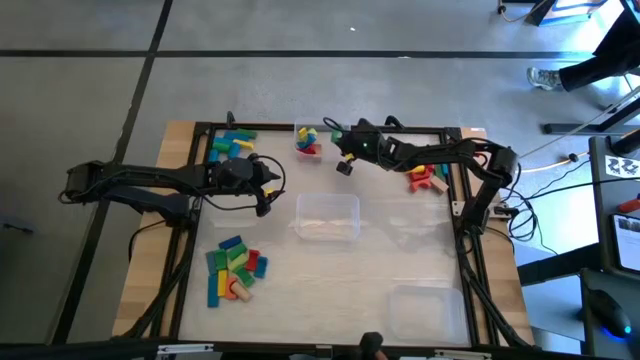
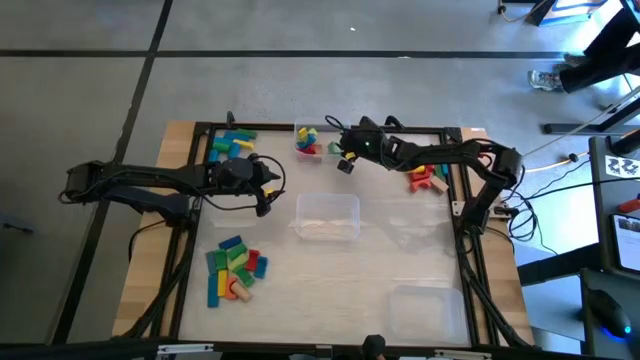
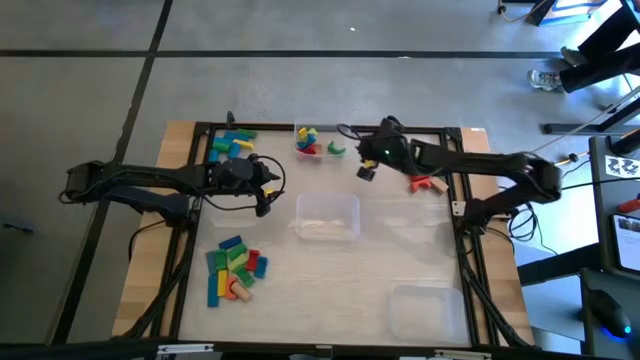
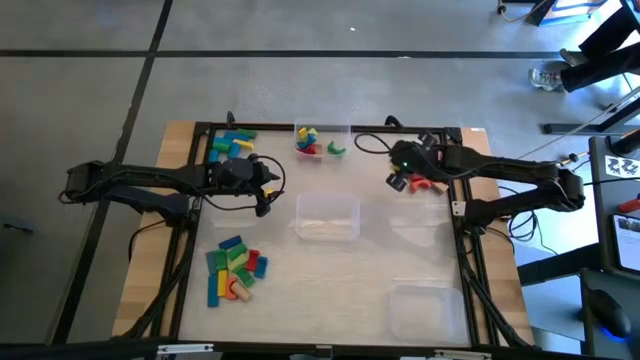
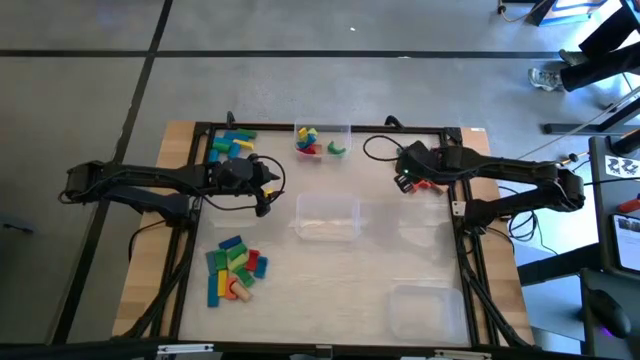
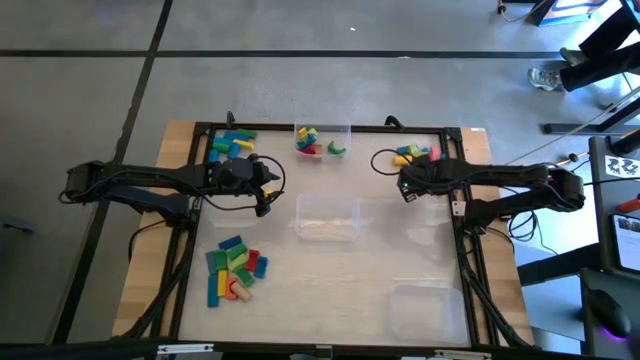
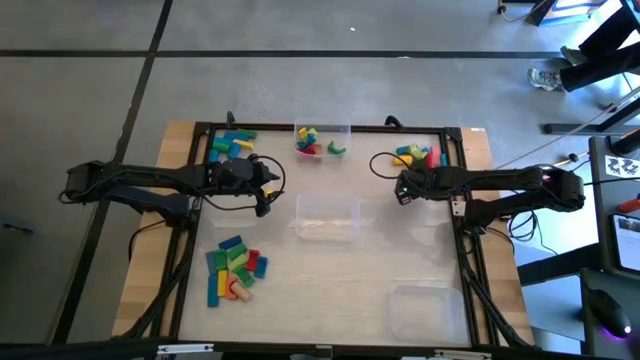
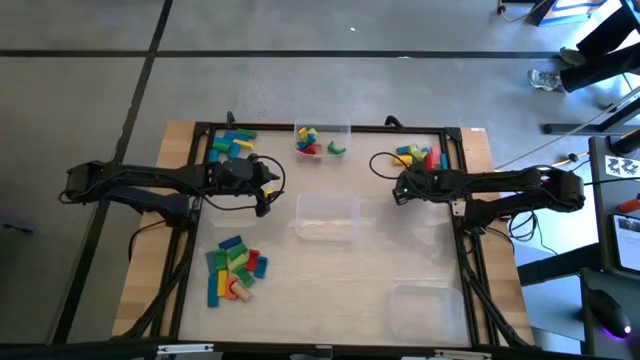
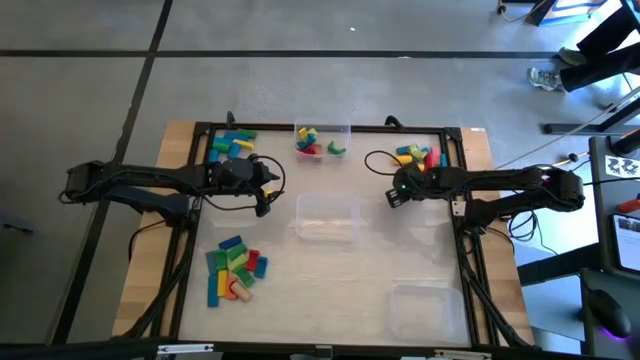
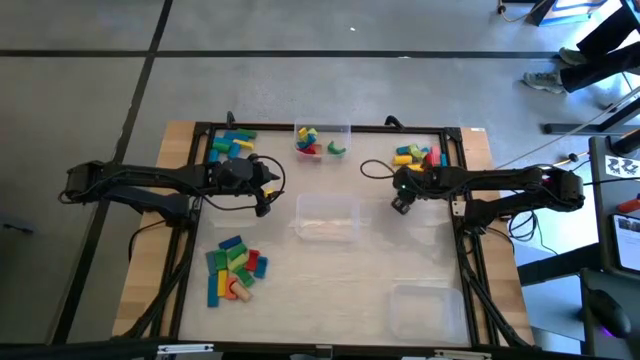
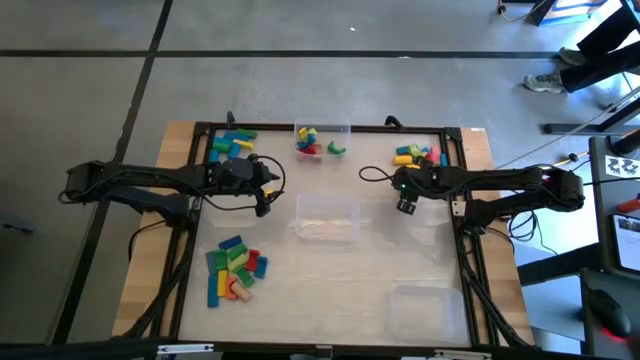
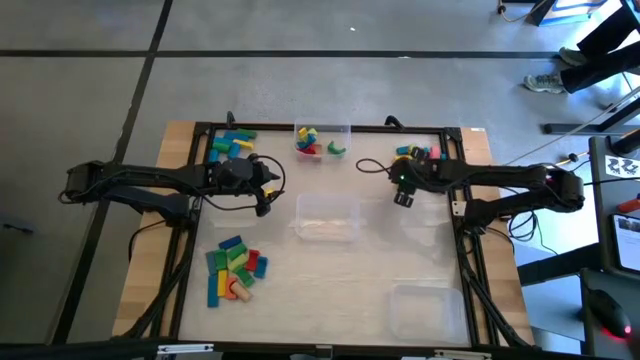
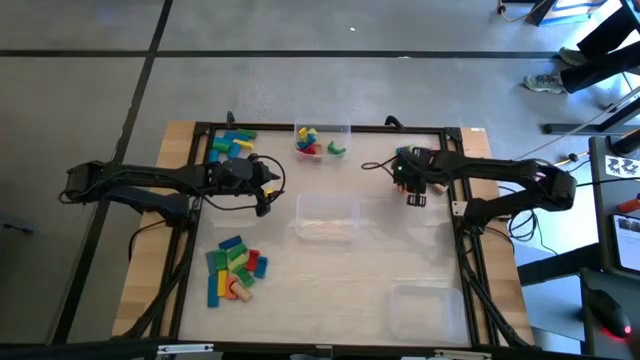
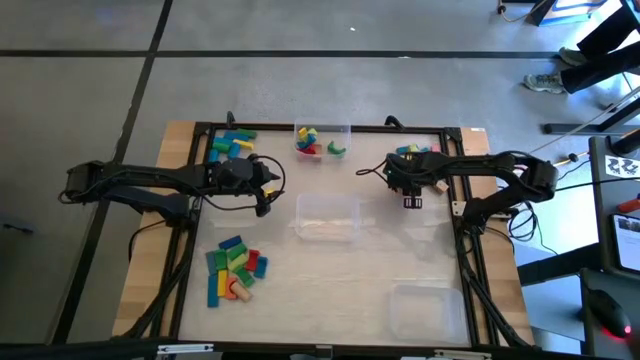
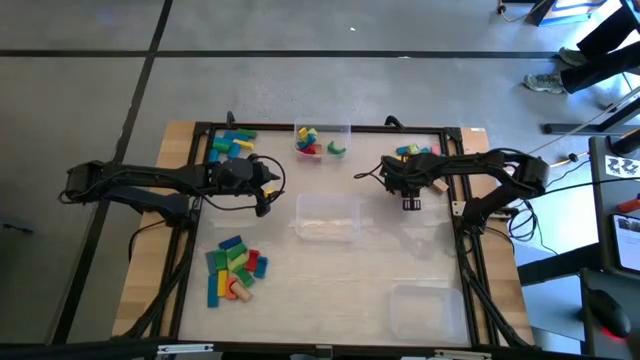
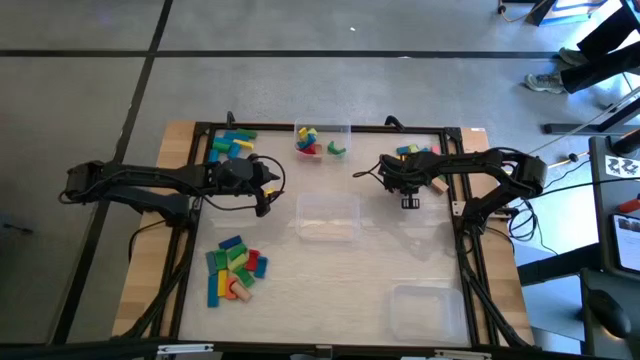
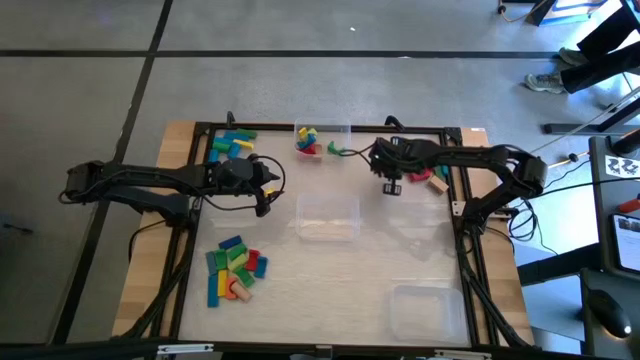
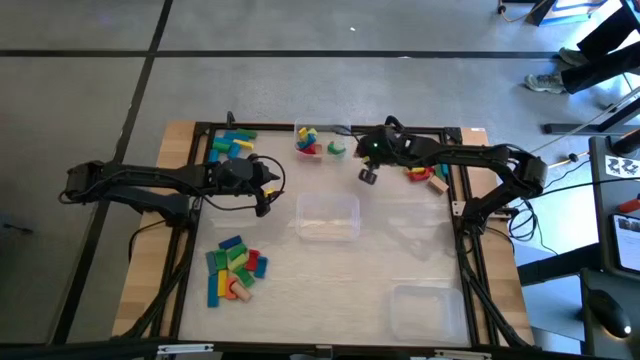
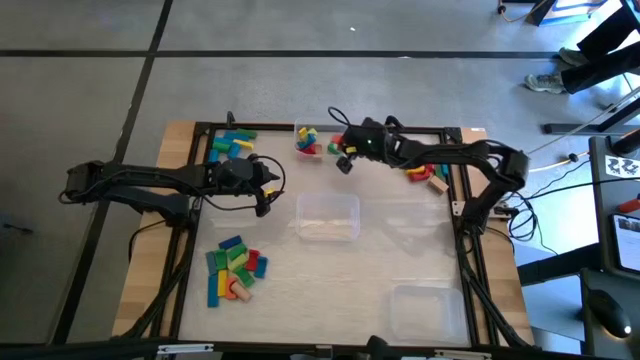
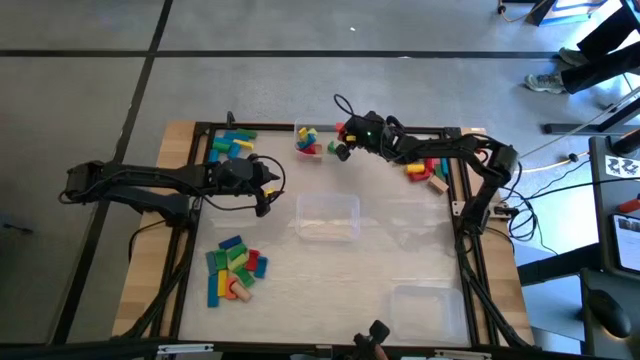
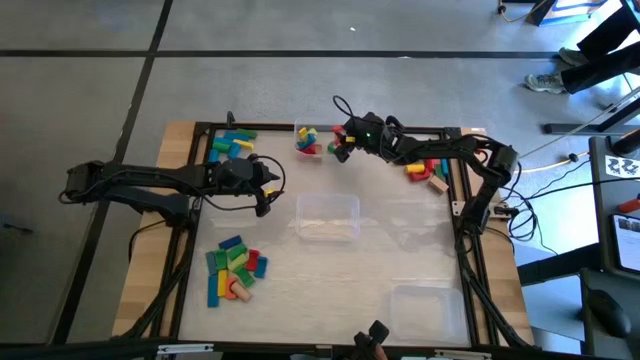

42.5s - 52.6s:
Task: Sort blocks by size
Put the orange arch block into the top transparent bin

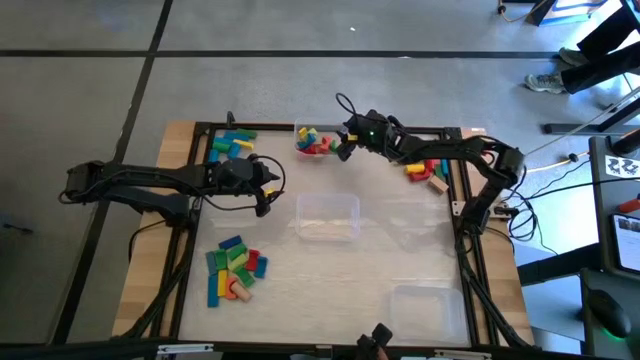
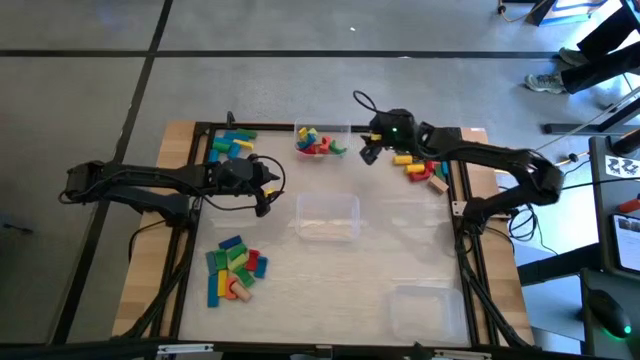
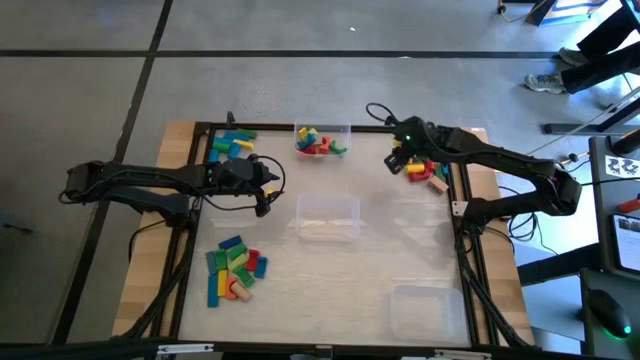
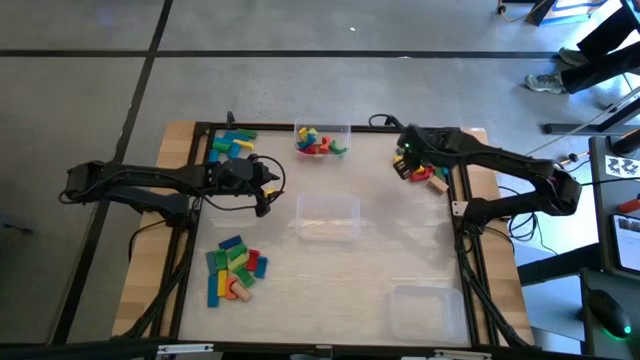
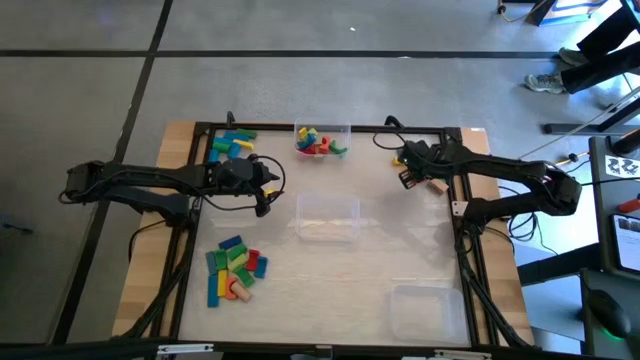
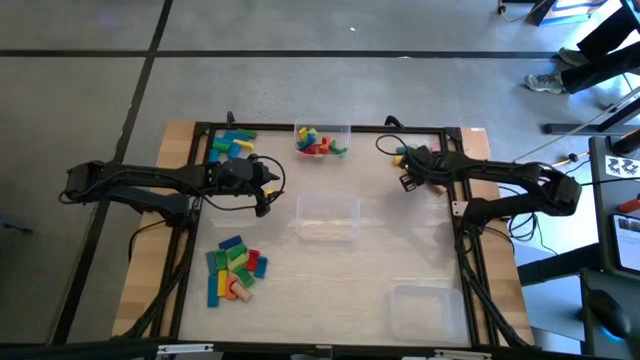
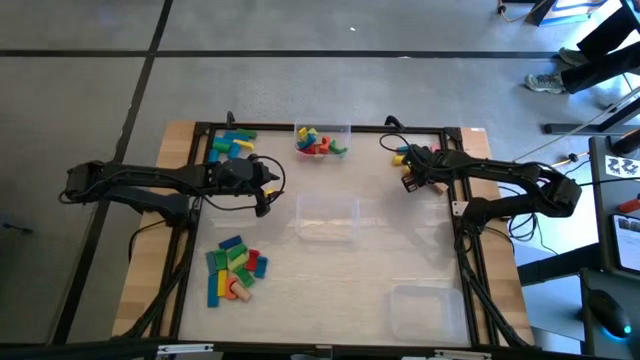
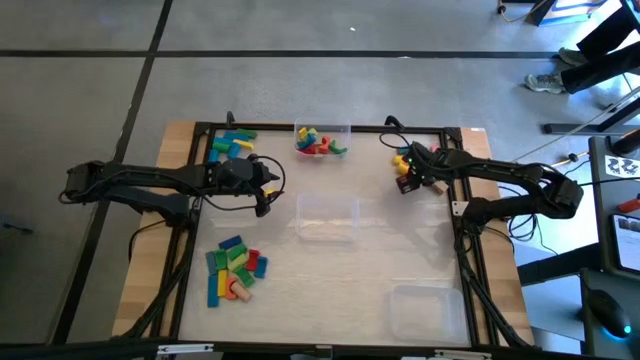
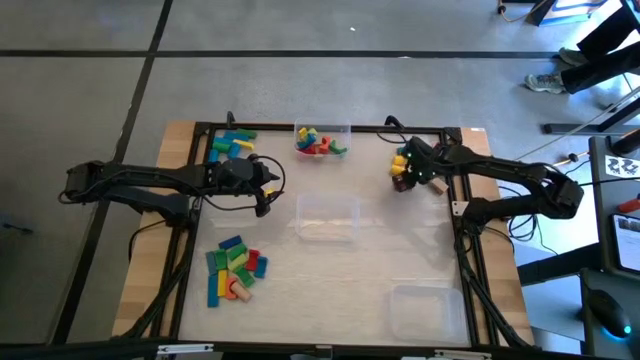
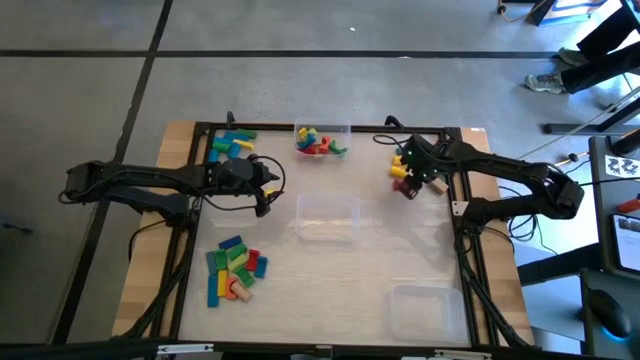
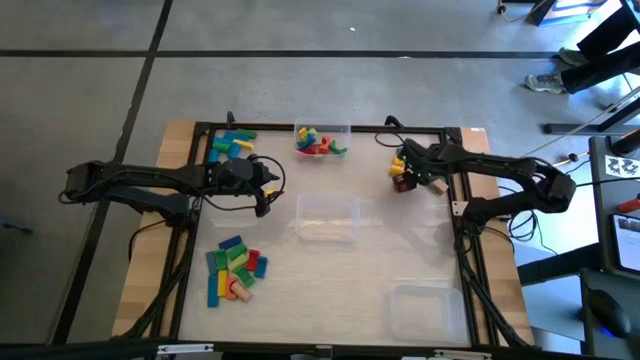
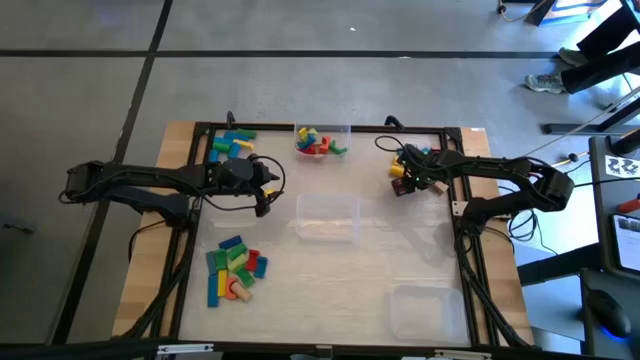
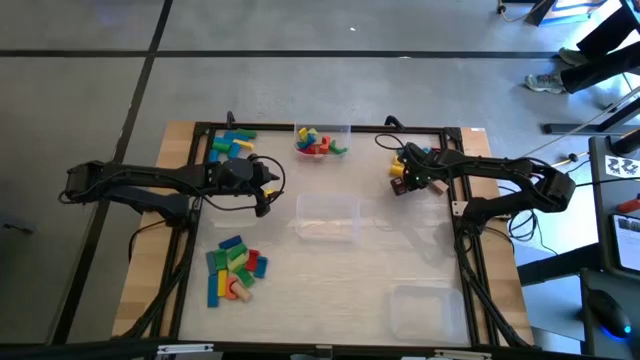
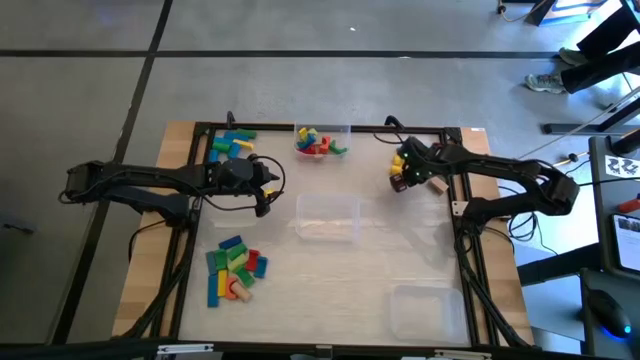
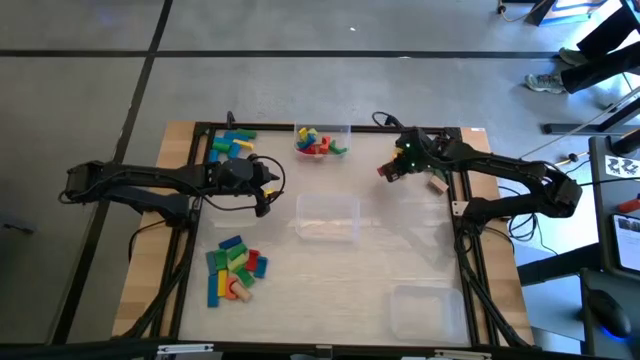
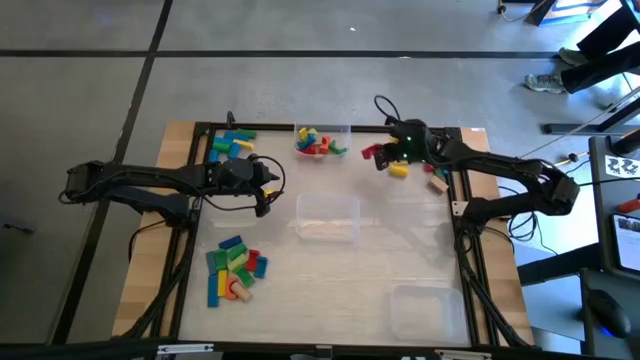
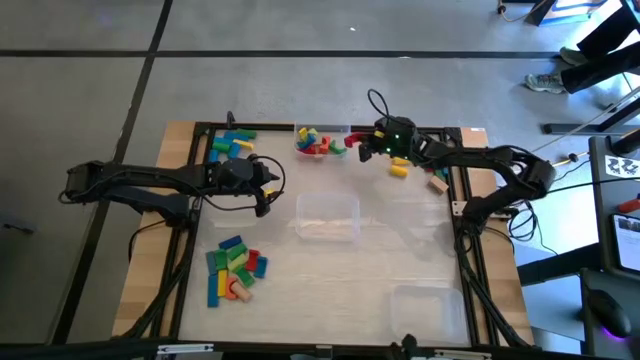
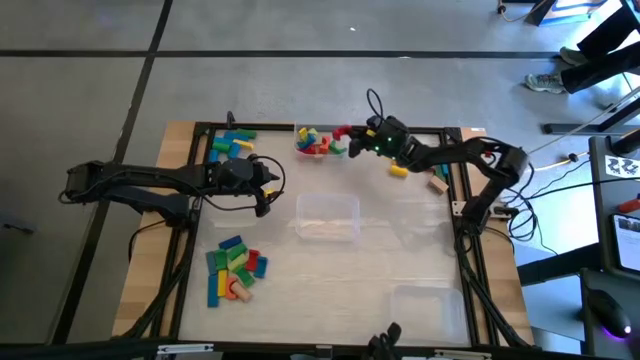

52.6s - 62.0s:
Put the red arch block into the top transparent bin

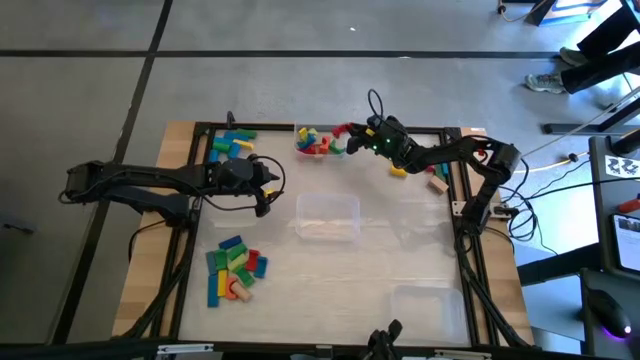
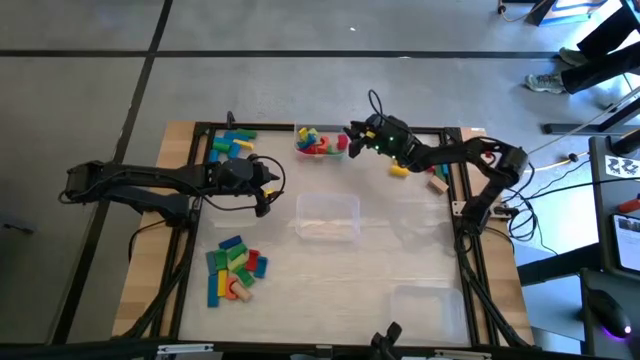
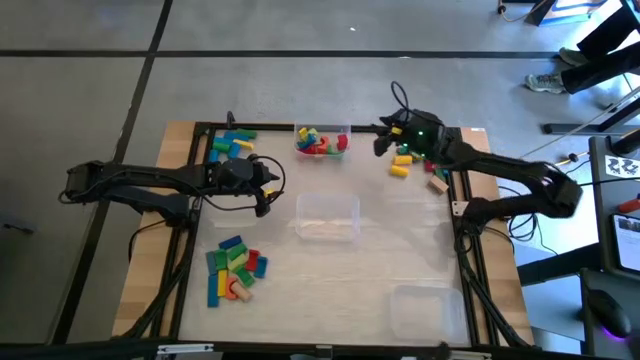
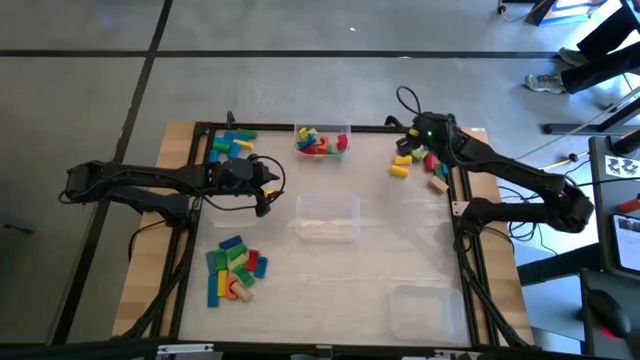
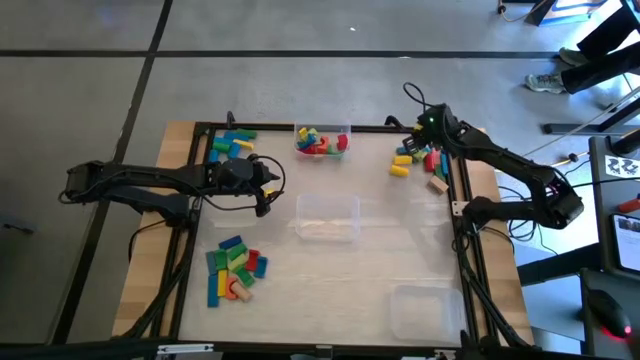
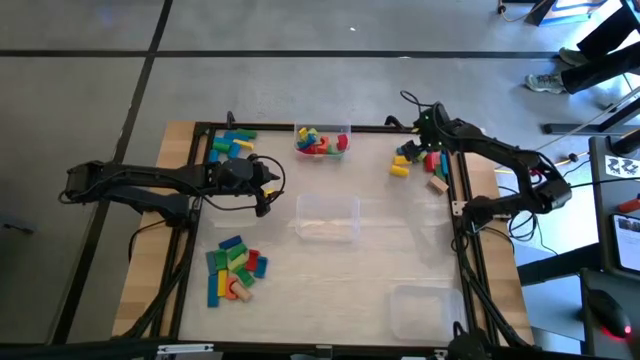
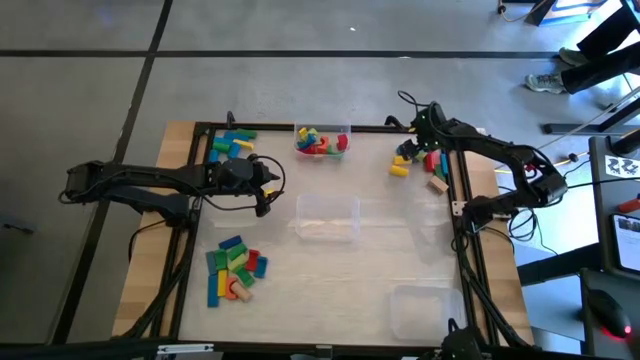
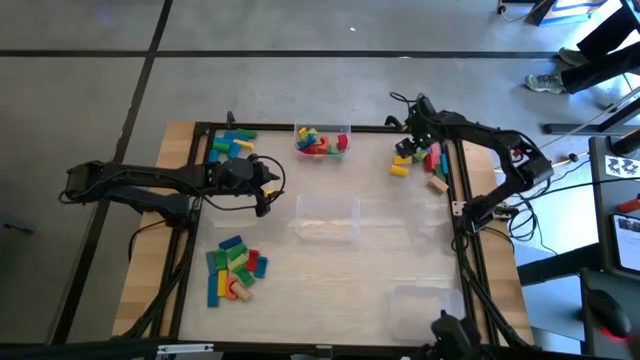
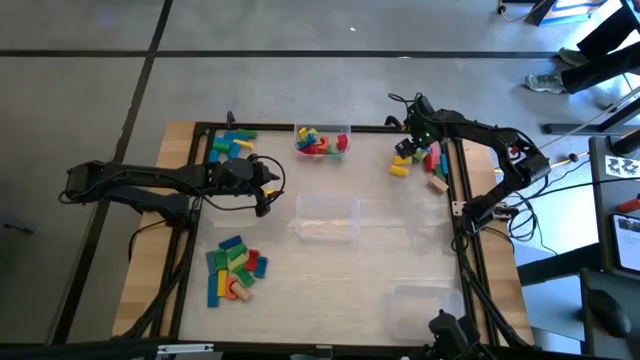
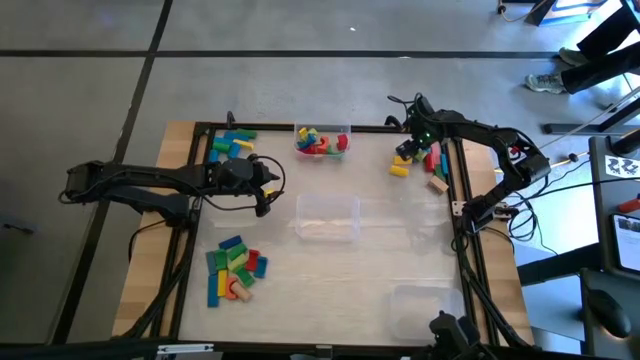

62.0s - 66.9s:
Put the light green arch block into the top transparent bin
